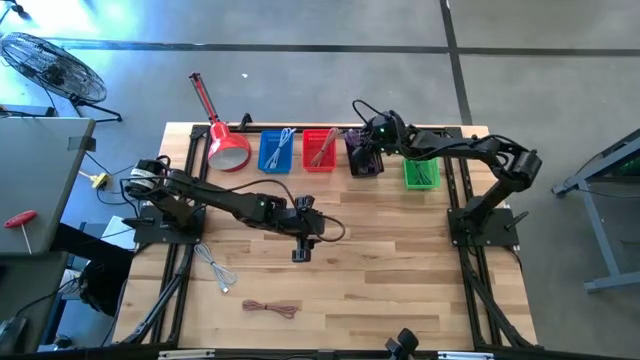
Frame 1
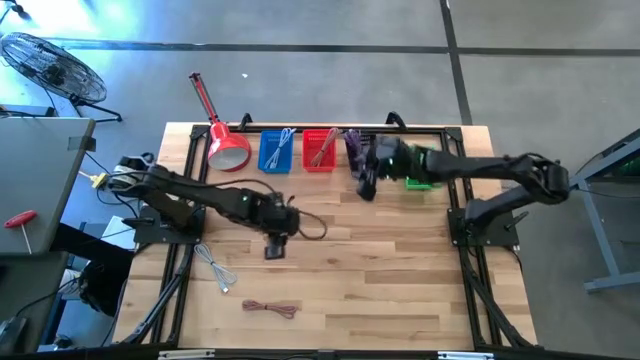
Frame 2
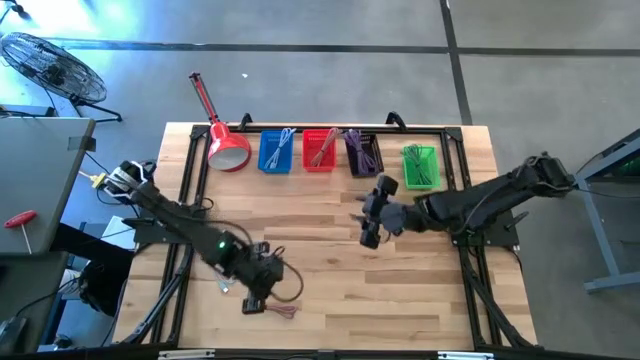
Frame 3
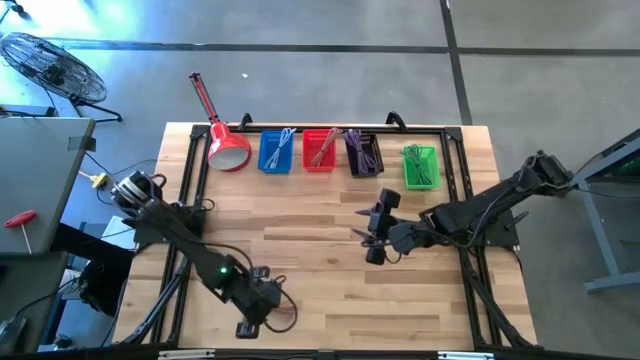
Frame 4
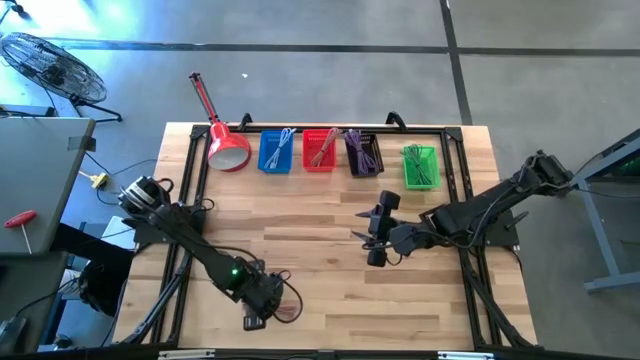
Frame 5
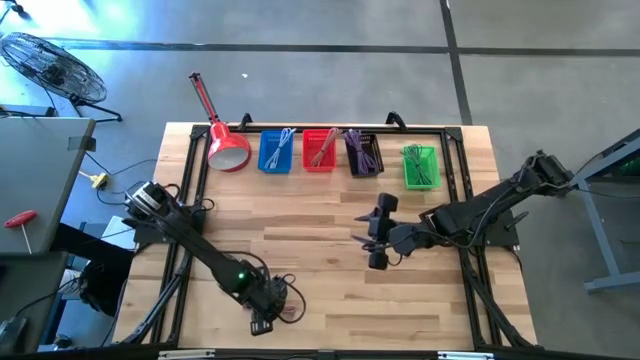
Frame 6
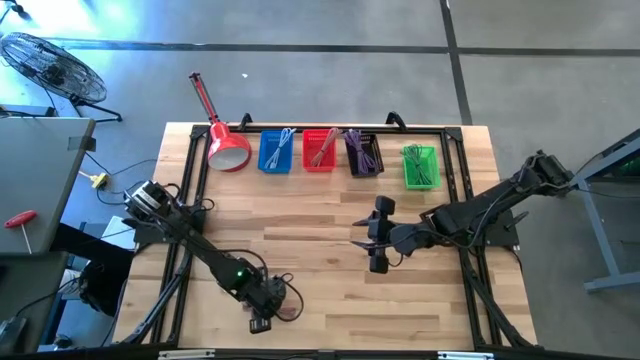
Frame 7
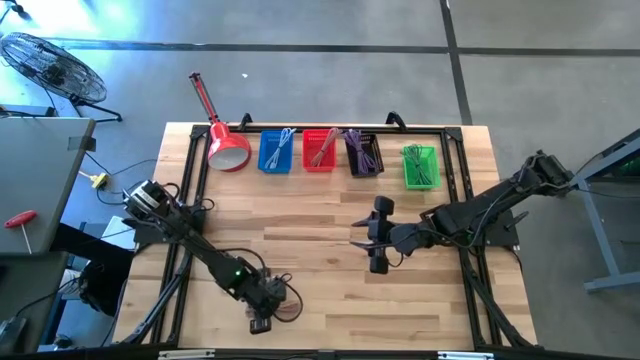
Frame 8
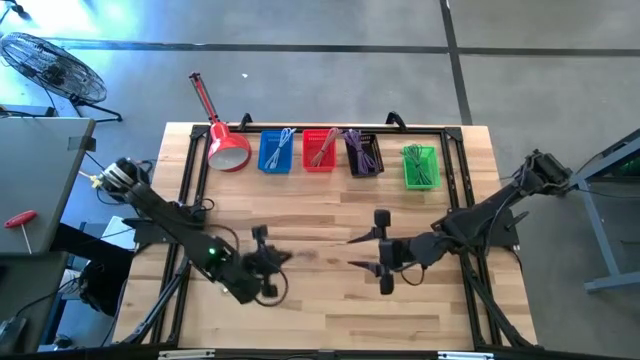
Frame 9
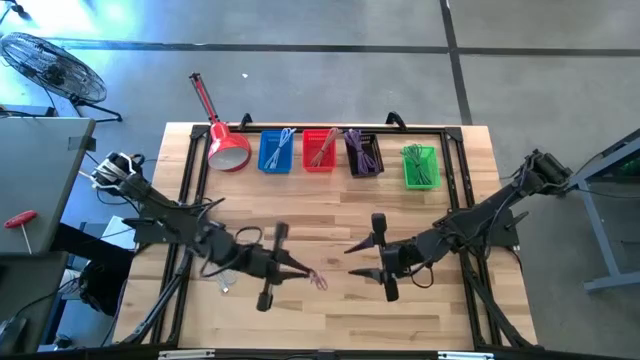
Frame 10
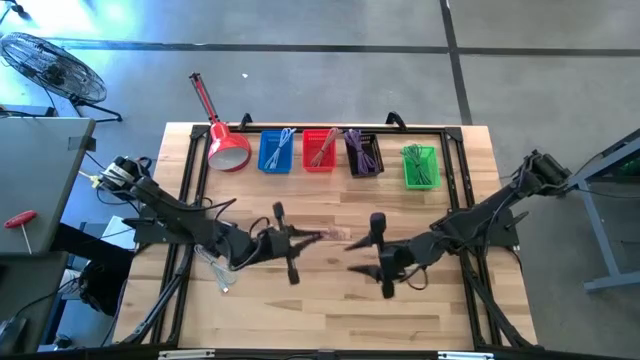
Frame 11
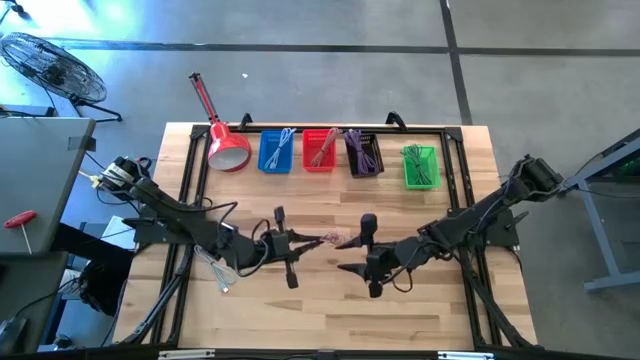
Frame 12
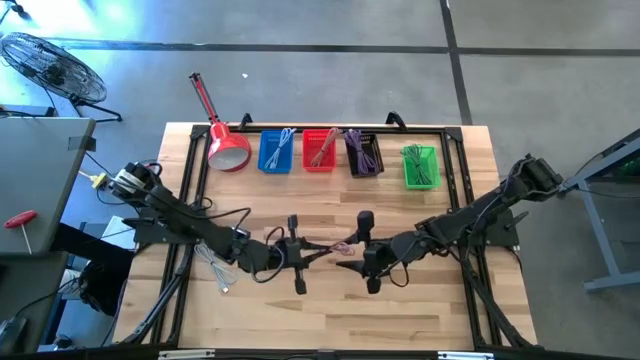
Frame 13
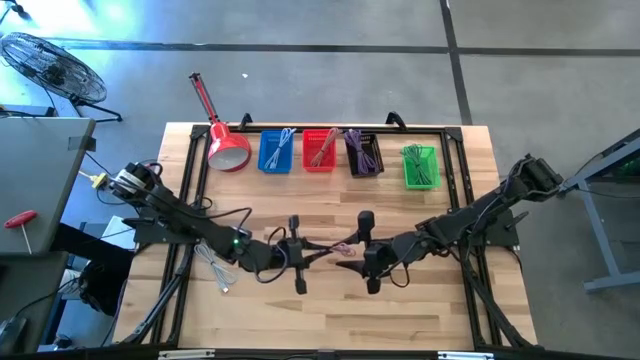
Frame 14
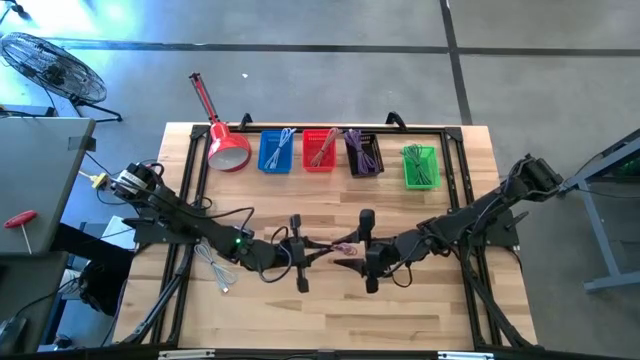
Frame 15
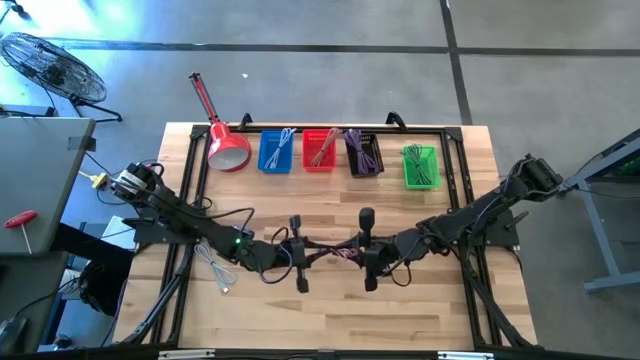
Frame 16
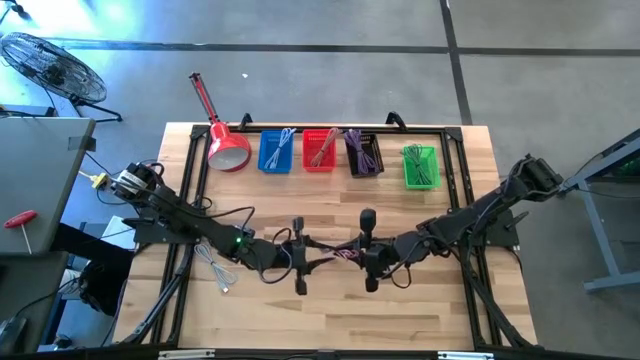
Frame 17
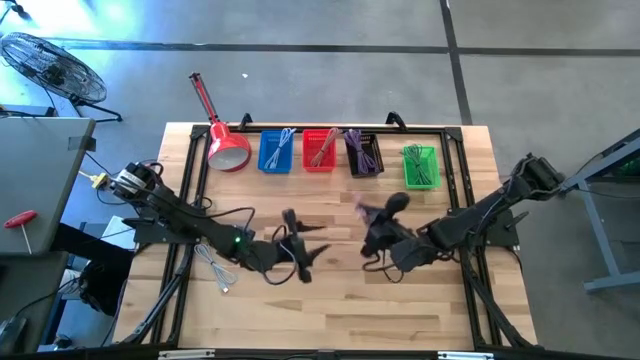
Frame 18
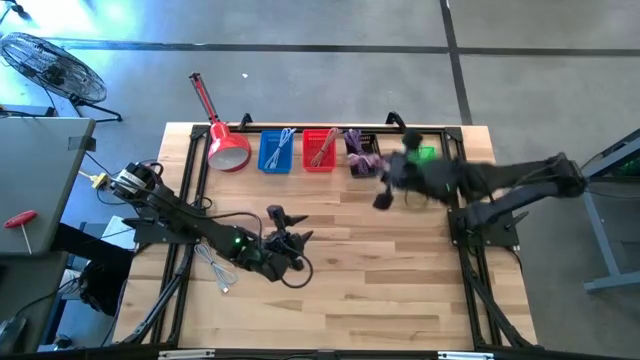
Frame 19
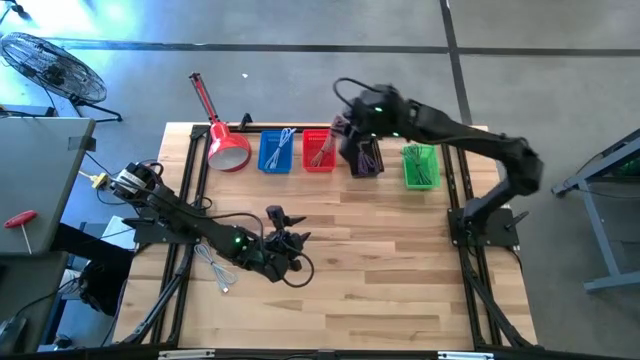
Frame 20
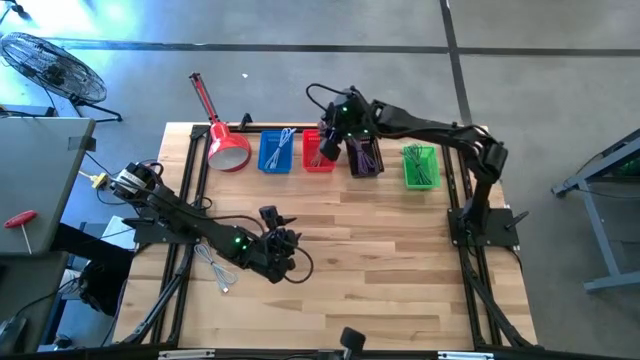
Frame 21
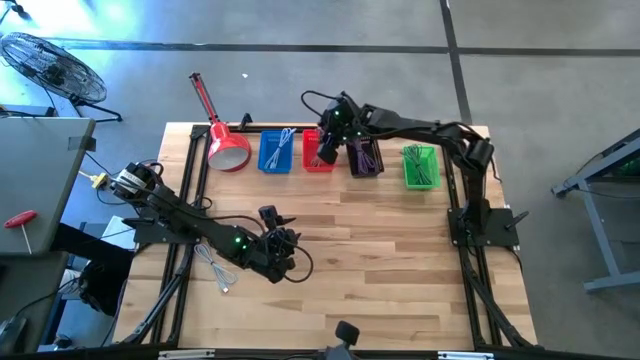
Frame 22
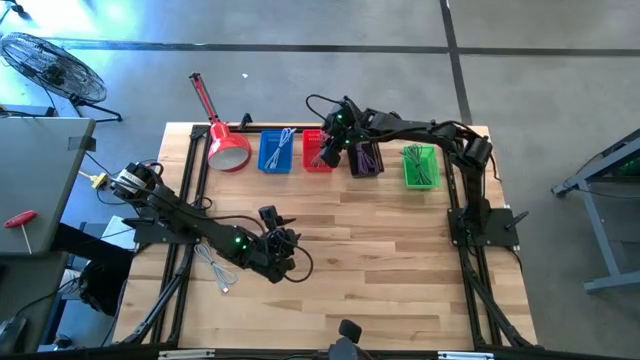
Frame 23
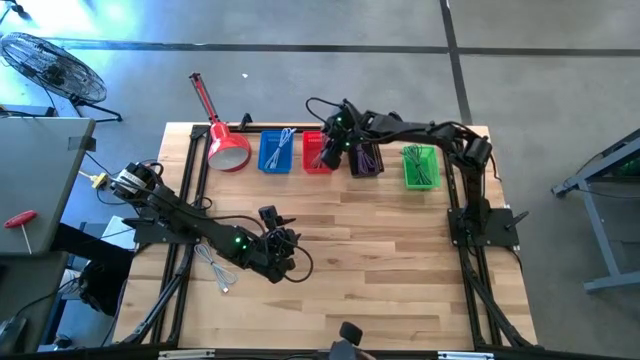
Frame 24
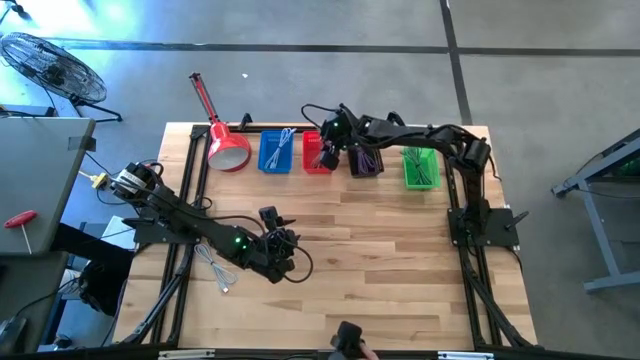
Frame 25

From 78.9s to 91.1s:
Task: Pick & Place USB Port
Put the pink charger cable into the red bin

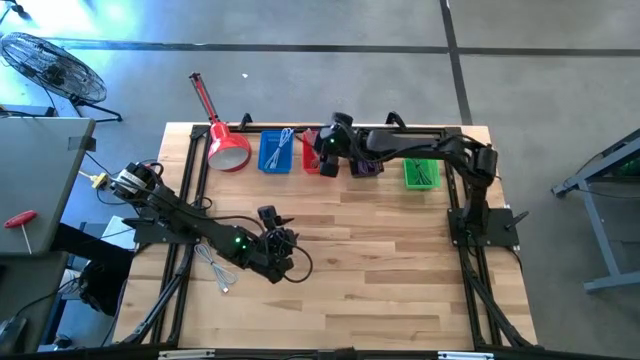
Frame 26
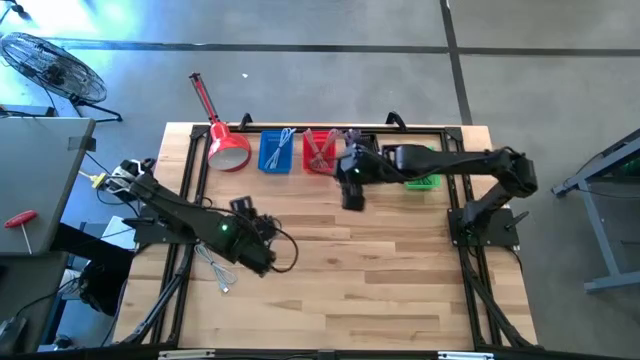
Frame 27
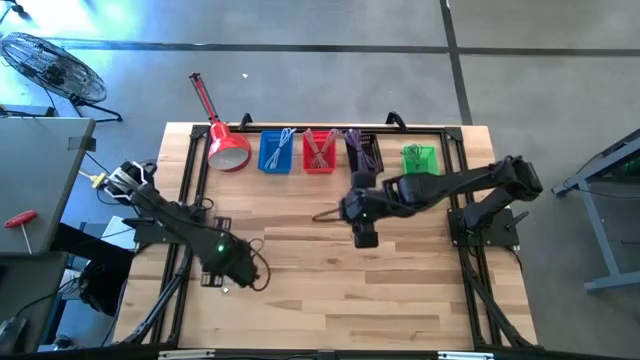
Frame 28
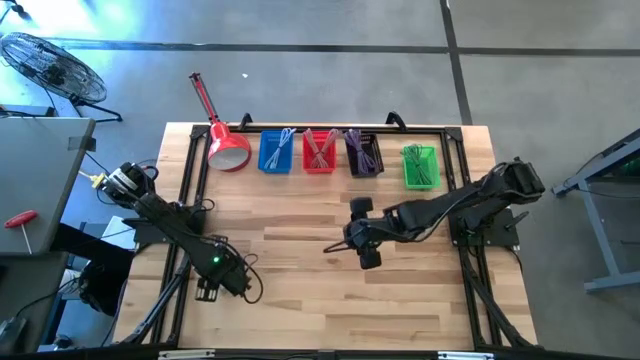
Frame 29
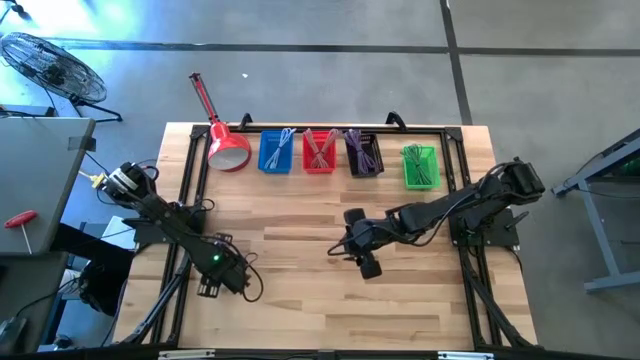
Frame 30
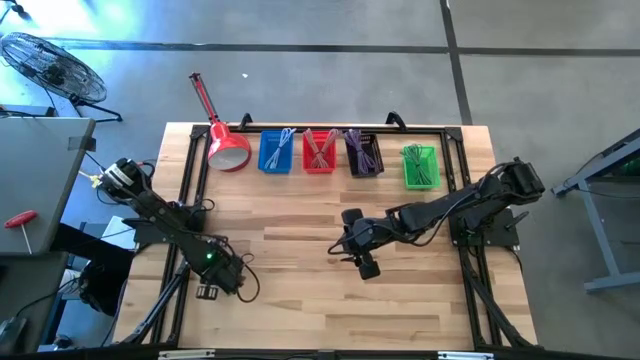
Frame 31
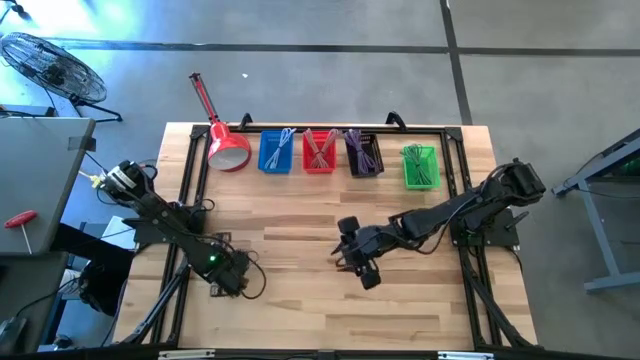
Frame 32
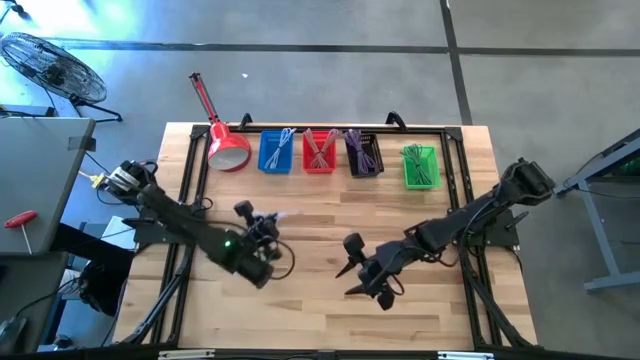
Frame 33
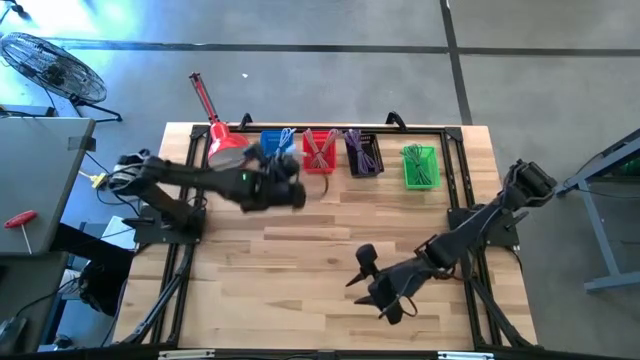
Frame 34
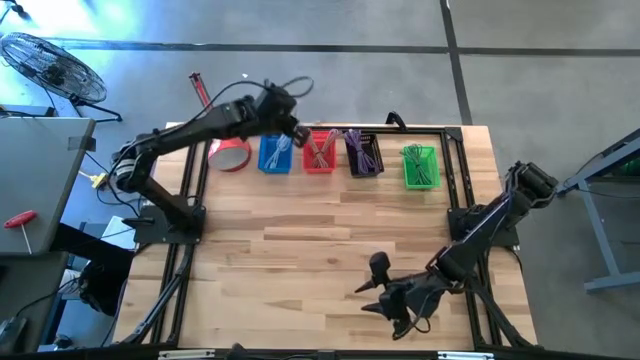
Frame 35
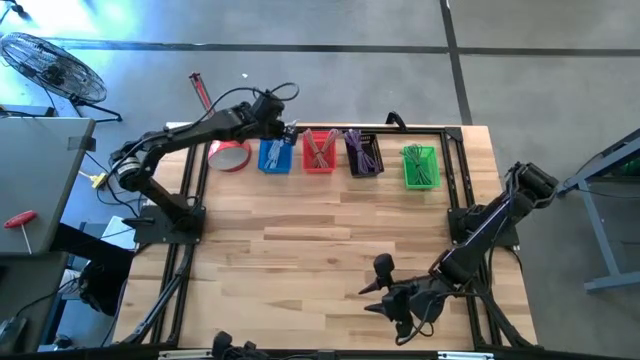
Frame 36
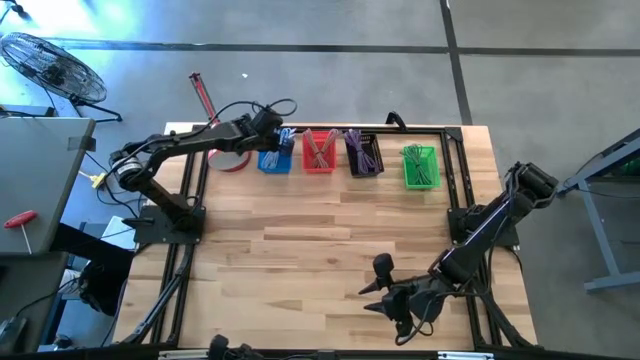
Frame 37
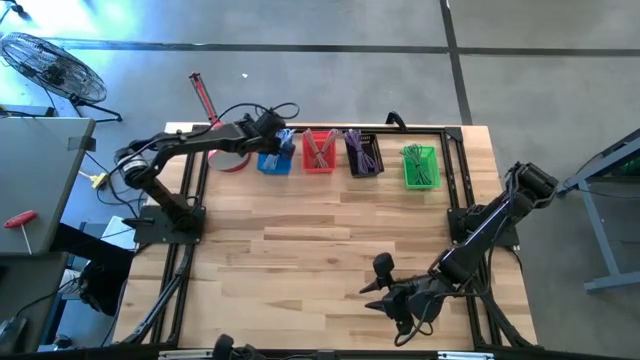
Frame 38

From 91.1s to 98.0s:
Put the blue charger cable into the blue bin
